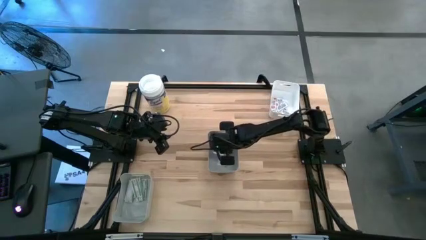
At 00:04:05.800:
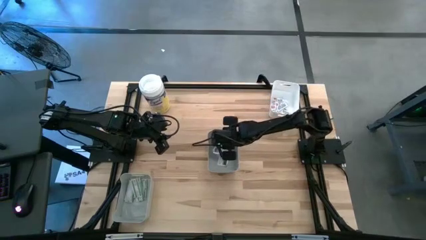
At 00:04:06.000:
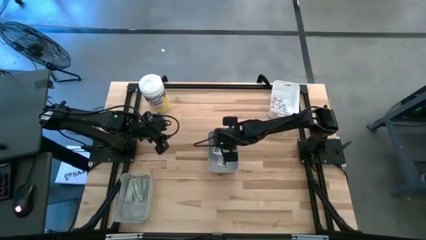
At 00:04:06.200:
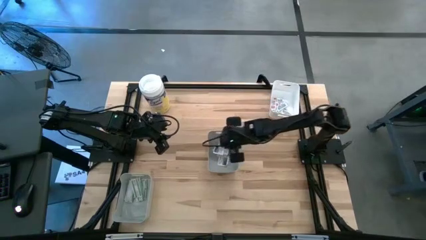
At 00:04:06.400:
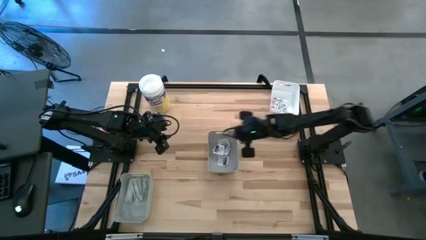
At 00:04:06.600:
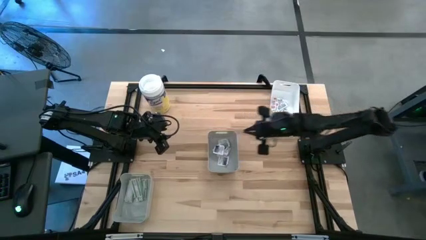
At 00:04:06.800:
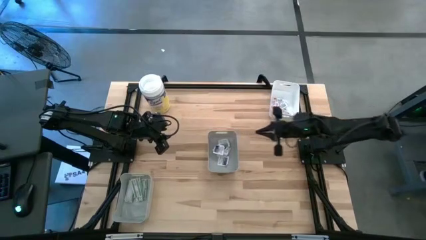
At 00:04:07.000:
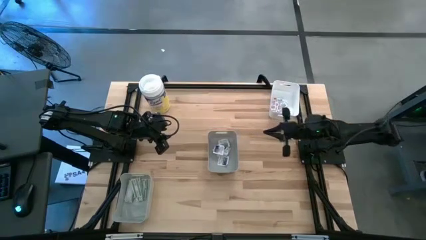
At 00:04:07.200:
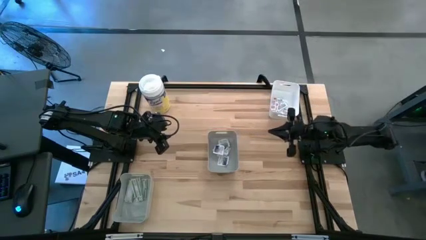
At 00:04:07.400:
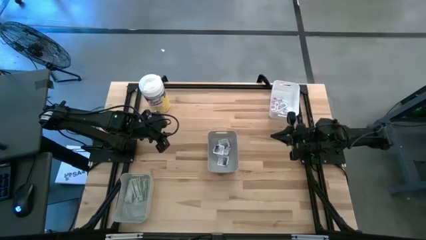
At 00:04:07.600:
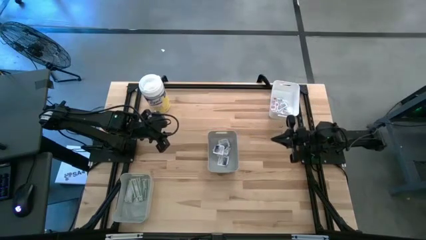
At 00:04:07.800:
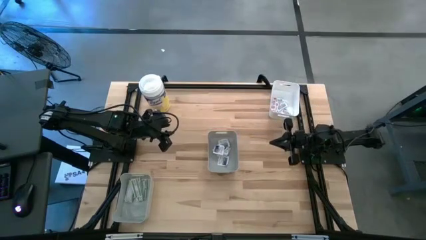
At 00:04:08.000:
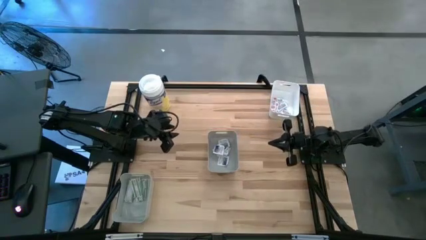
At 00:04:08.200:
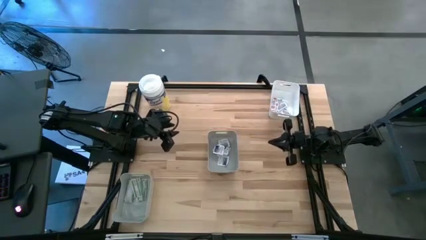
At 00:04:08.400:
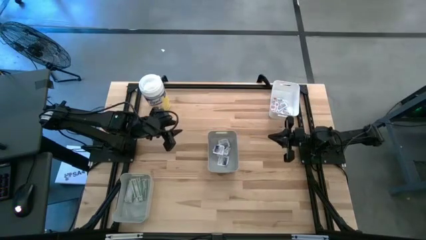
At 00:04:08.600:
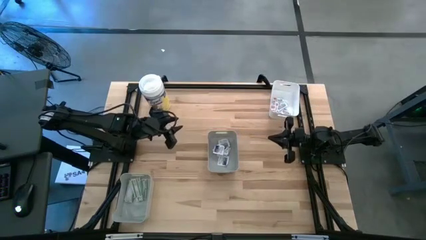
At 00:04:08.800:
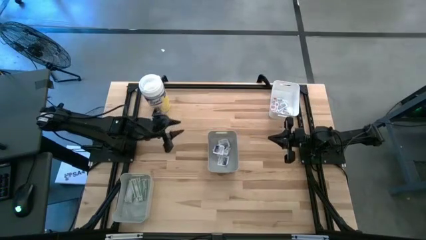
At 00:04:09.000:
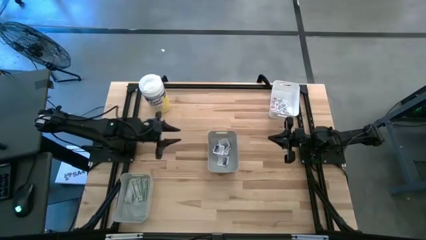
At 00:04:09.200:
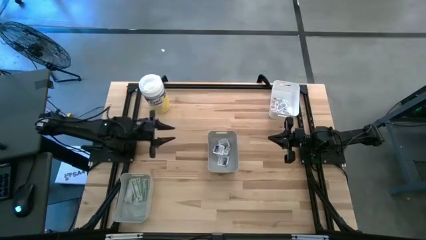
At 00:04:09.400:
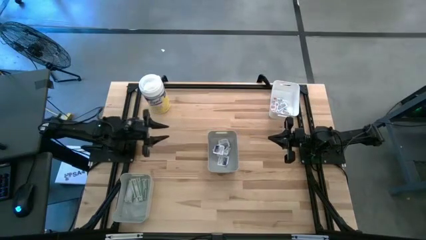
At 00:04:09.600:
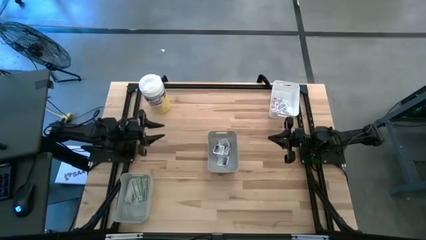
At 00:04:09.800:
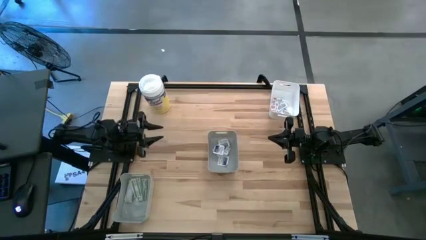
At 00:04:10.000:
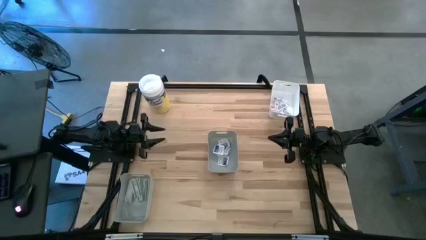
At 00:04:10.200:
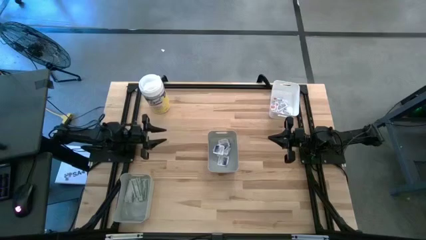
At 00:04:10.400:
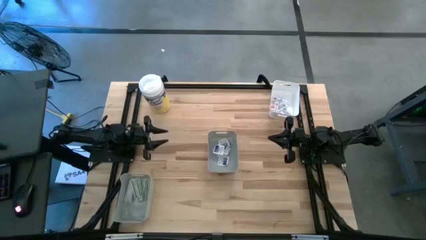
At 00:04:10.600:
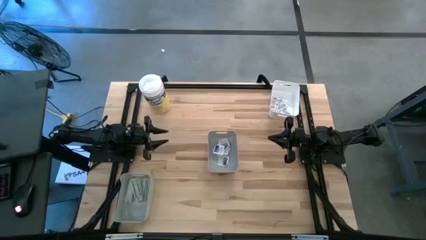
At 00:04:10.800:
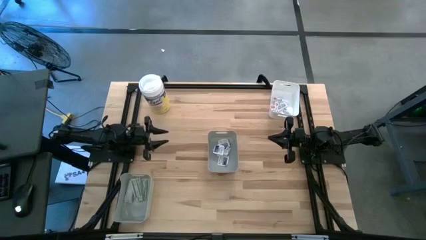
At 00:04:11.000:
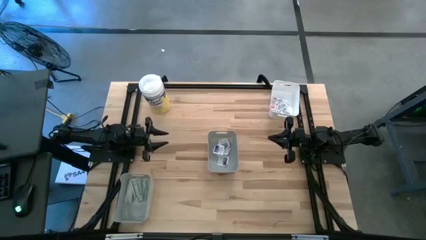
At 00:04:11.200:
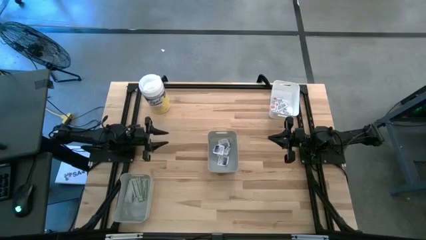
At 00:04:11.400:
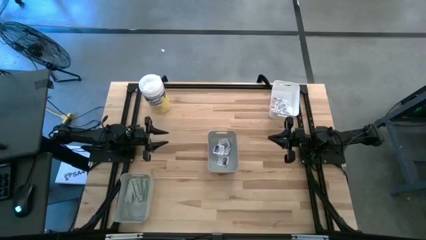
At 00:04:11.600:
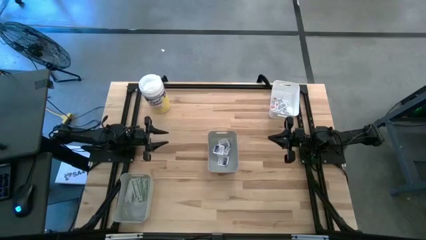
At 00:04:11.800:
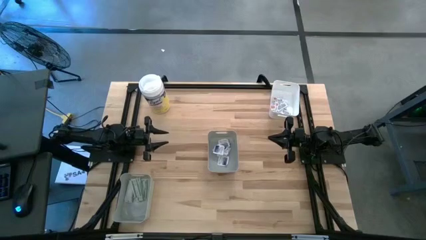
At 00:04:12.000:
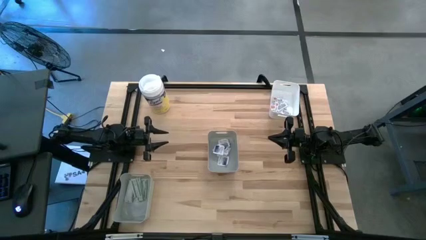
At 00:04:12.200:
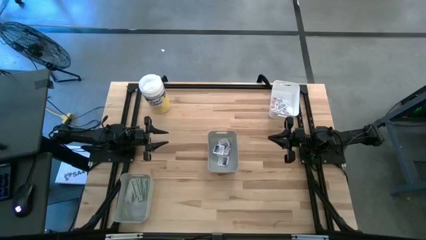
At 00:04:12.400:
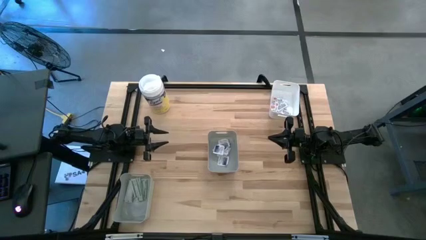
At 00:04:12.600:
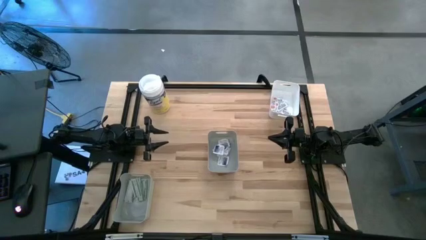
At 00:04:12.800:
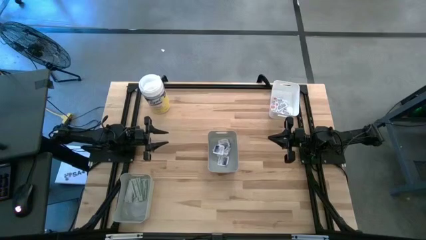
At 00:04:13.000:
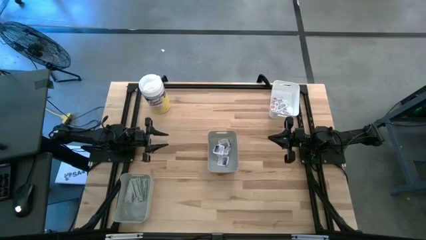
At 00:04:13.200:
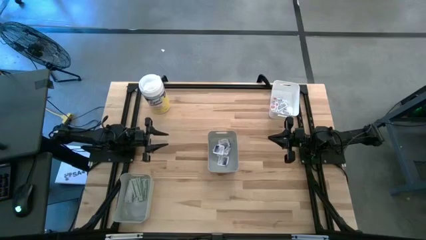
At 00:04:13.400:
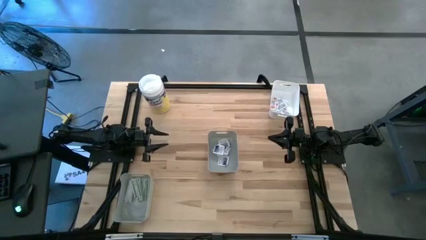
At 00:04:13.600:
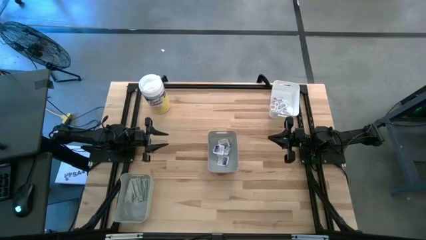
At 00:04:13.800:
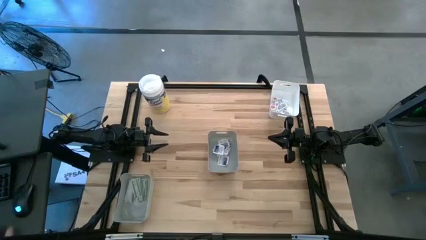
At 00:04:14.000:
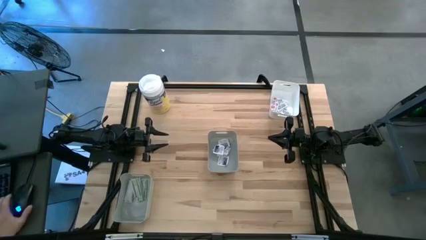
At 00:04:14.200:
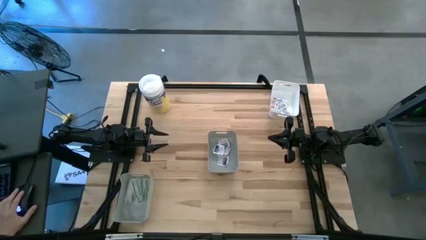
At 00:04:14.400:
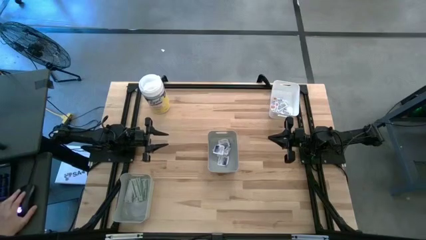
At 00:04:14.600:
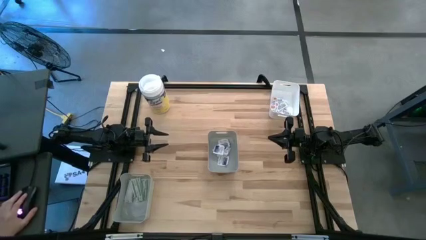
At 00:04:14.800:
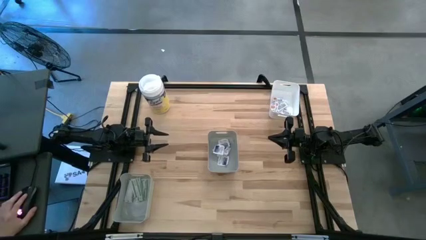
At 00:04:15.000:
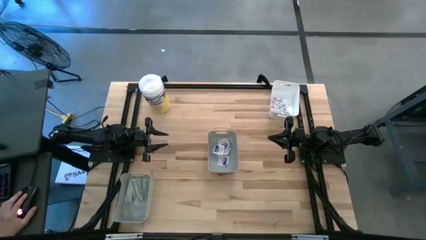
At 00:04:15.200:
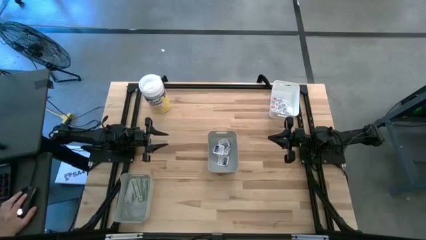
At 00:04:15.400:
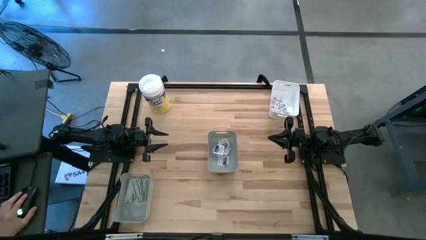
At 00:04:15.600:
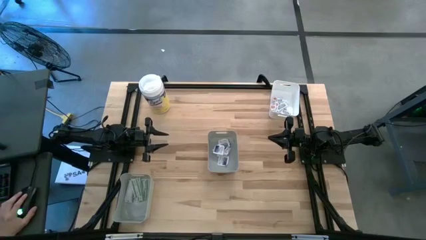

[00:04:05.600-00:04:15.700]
Task: Pick & Place First Aid Supplies
Return to Home Position

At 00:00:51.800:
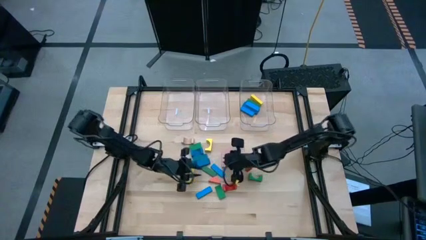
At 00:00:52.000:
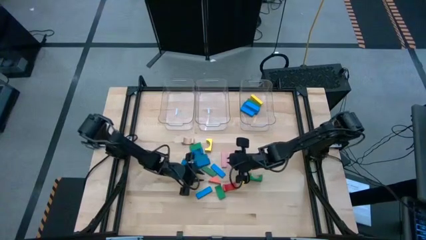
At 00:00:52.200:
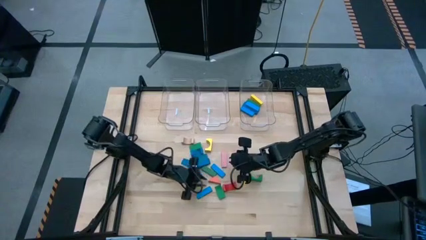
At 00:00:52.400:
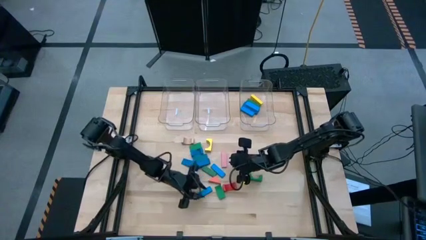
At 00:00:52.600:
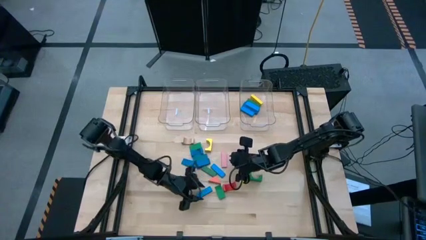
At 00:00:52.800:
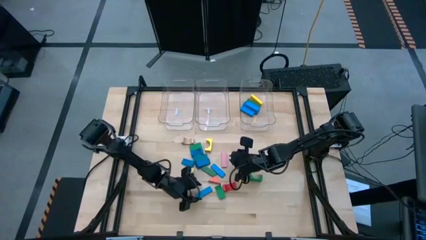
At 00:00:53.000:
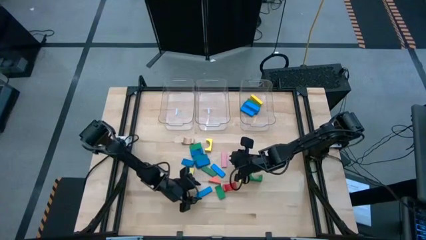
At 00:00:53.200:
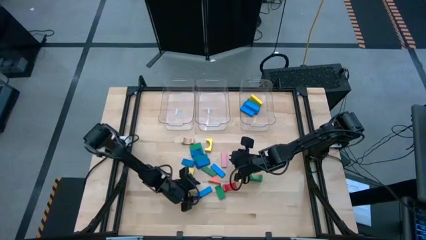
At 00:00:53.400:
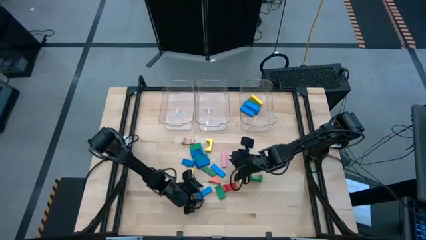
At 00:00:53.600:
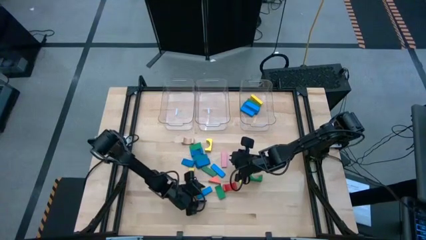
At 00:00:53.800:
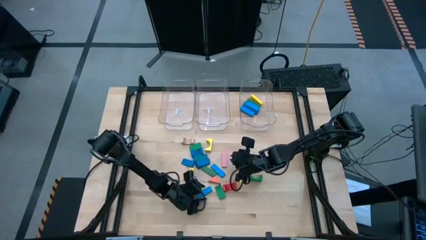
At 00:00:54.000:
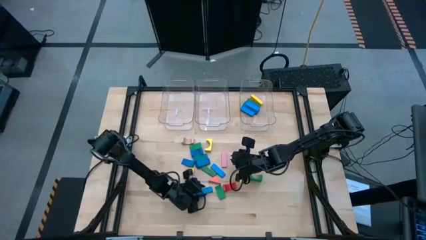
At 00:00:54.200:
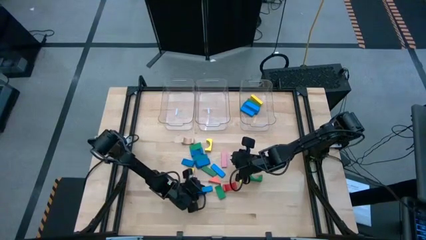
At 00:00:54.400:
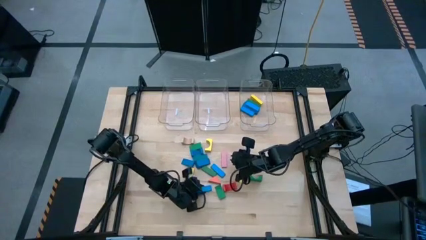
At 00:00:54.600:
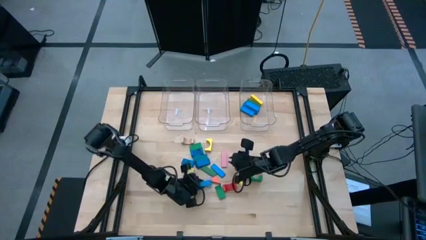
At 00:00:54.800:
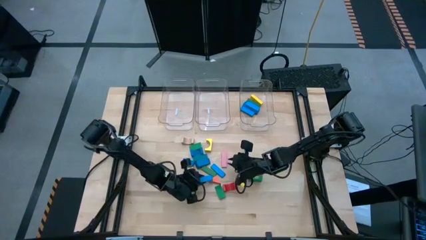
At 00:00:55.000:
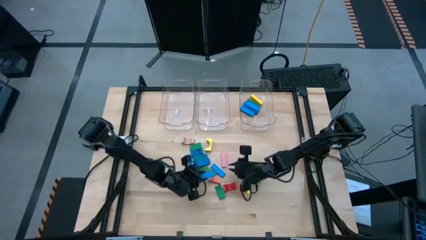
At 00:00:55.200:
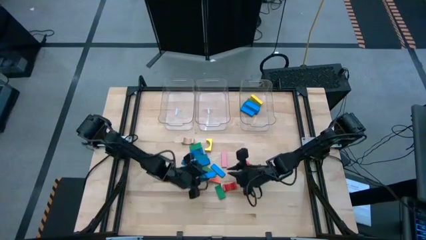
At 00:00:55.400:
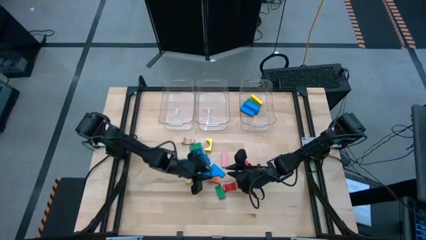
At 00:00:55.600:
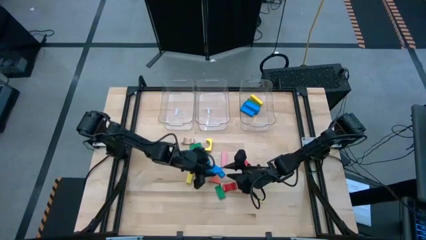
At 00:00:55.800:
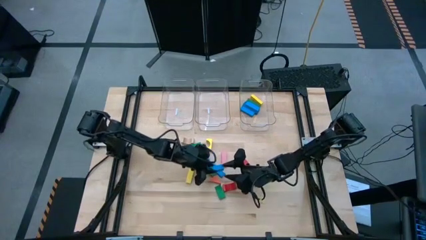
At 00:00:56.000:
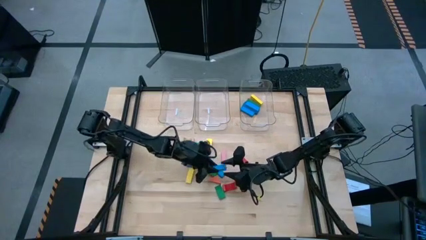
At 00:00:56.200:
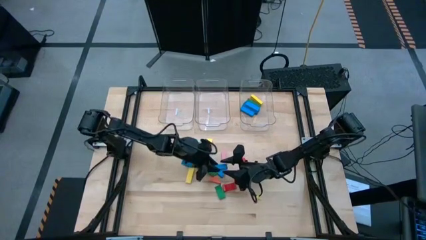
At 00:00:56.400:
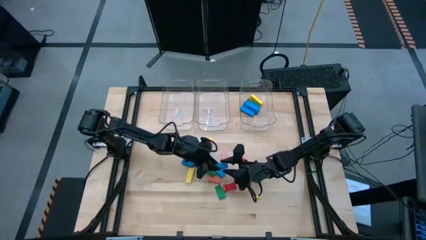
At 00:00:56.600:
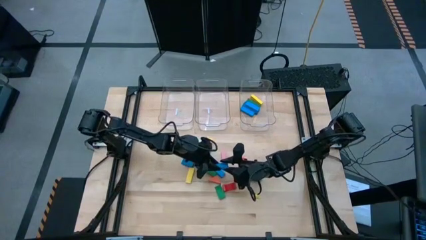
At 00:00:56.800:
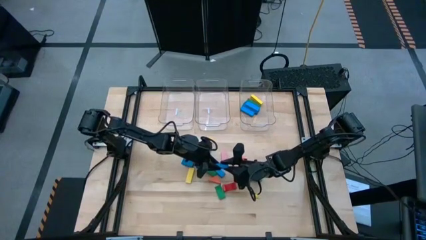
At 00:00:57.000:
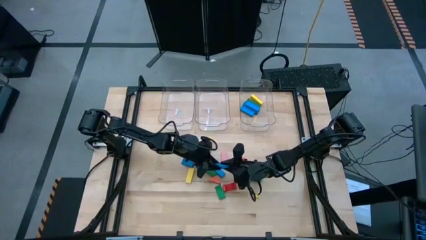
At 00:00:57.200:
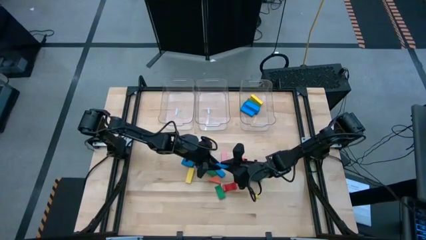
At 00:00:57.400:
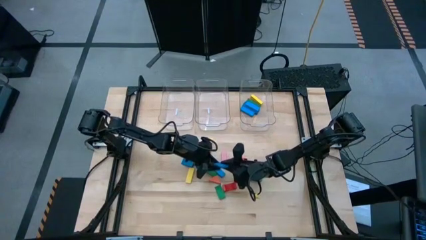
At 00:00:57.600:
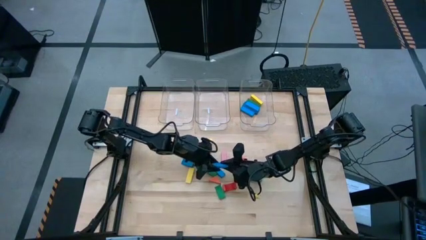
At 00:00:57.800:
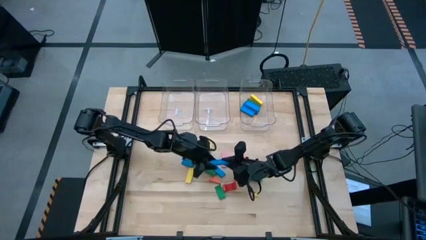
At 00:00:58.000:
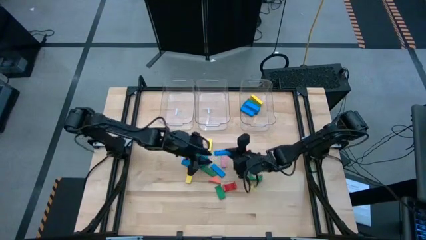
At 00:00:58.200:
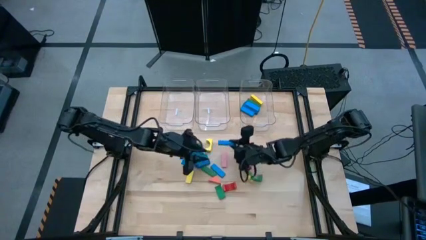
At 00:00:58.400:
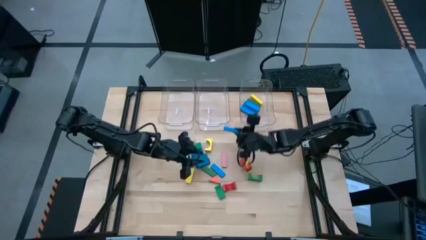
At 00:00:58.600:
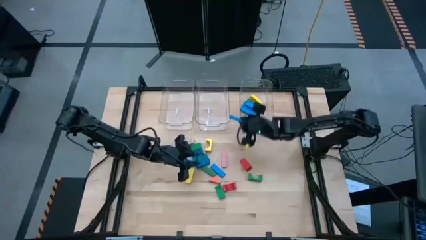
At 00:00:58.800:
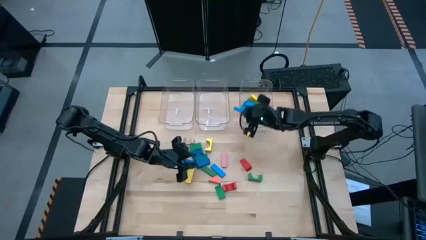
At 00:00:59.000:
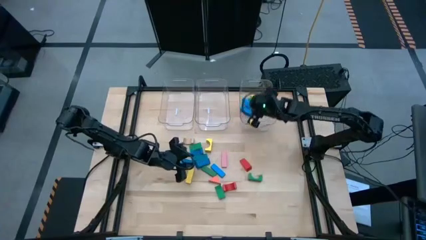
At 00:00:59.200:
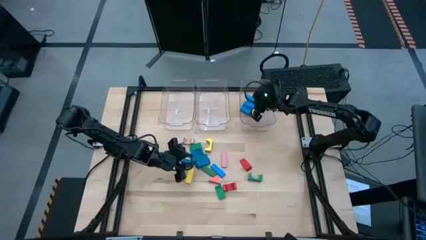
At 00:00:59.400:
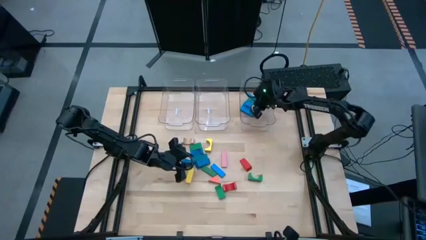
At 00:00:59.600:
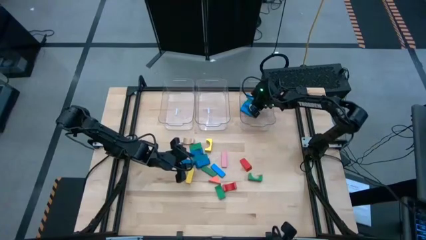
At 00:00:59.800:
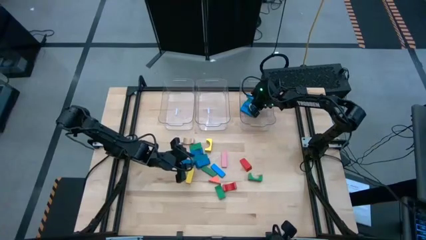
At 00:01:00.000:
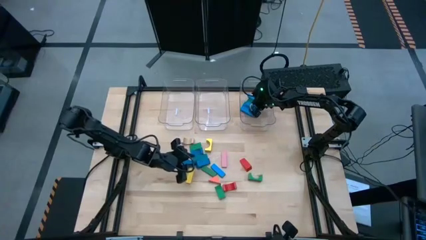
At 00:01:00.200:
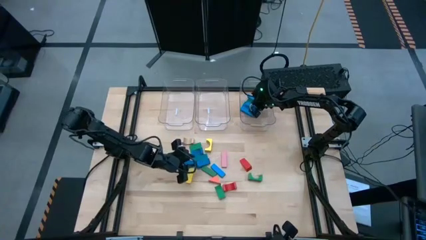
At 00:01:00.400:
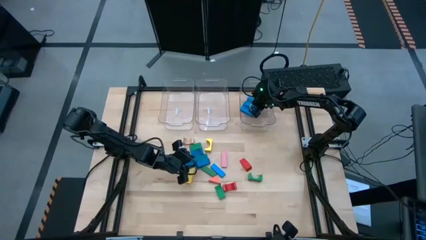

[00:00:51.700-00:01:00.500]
Task: Sort blocks by size
Put the blue rectangular block into the right transparent bin
